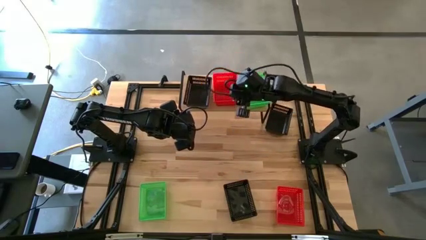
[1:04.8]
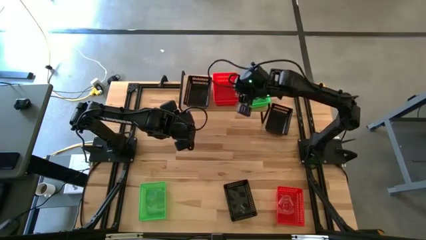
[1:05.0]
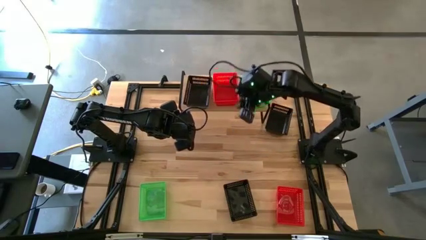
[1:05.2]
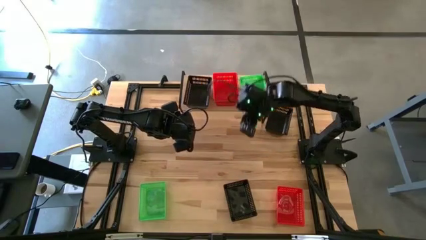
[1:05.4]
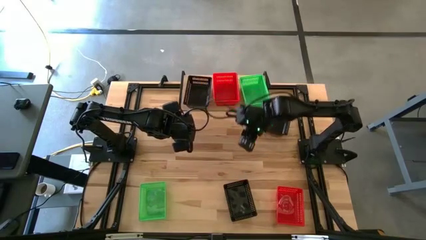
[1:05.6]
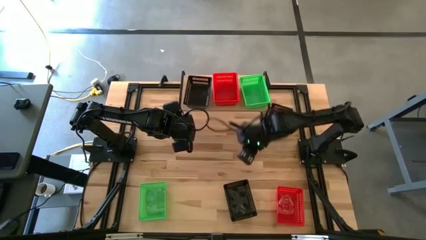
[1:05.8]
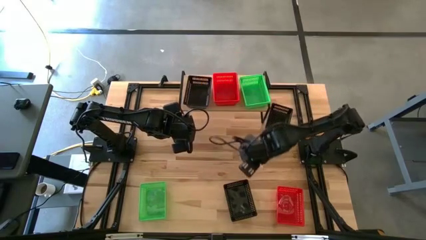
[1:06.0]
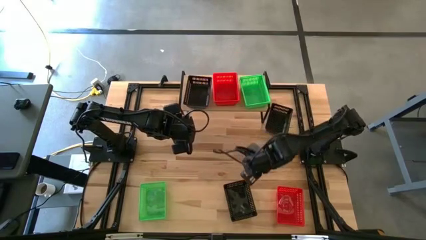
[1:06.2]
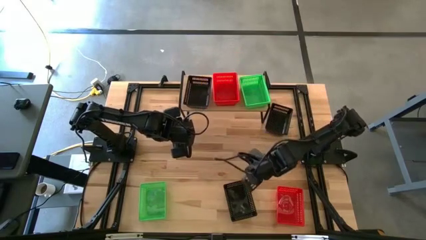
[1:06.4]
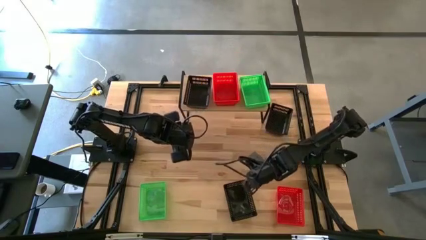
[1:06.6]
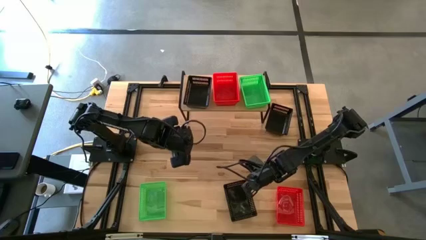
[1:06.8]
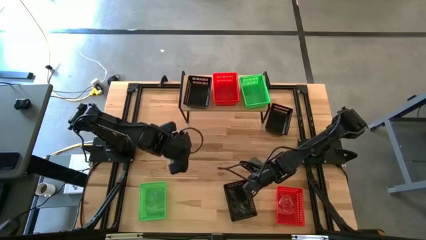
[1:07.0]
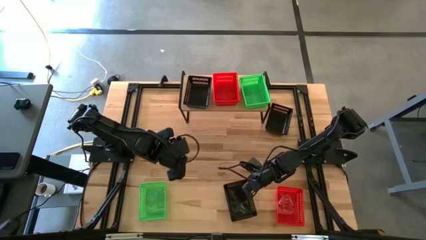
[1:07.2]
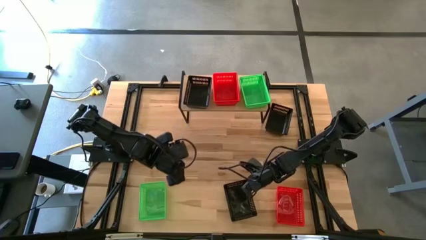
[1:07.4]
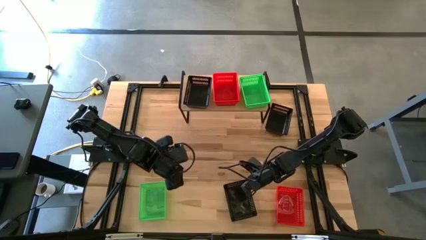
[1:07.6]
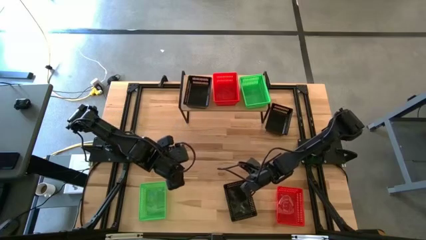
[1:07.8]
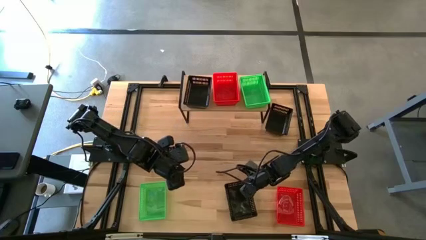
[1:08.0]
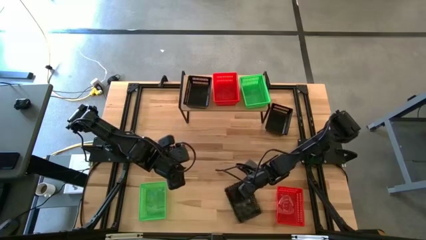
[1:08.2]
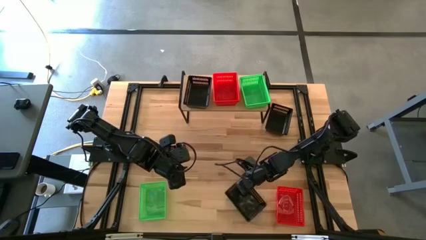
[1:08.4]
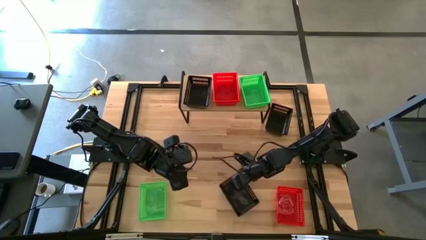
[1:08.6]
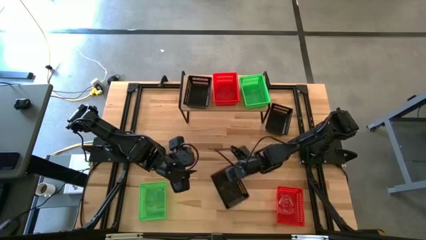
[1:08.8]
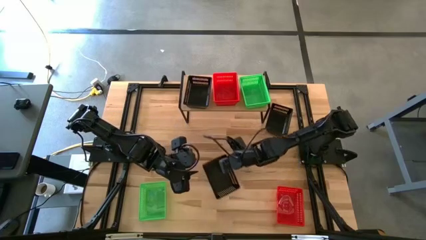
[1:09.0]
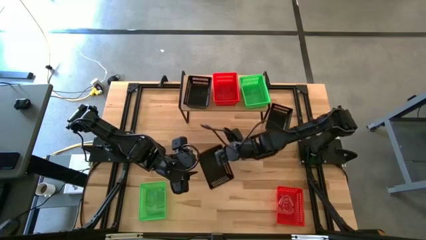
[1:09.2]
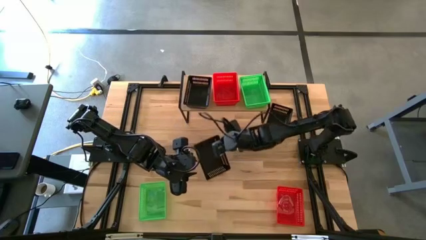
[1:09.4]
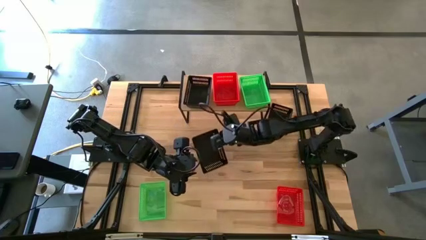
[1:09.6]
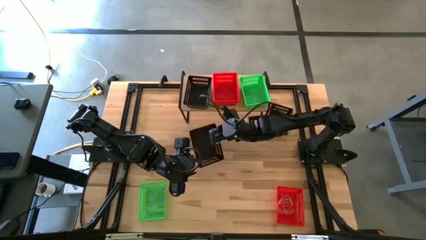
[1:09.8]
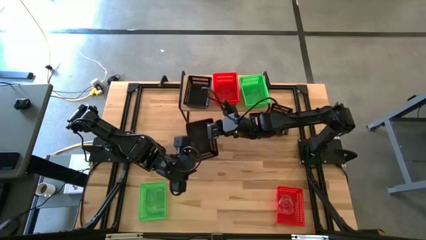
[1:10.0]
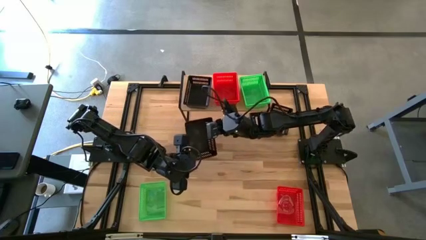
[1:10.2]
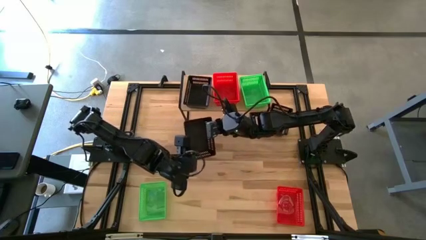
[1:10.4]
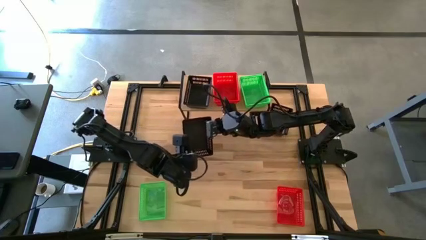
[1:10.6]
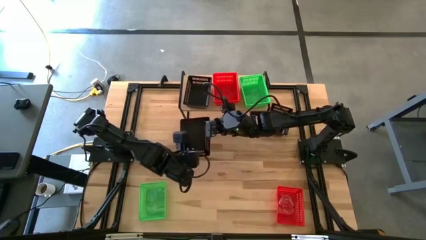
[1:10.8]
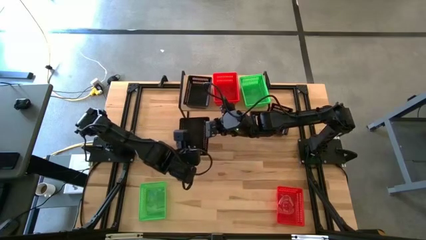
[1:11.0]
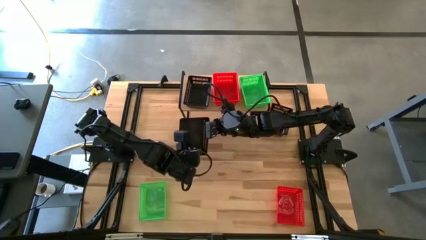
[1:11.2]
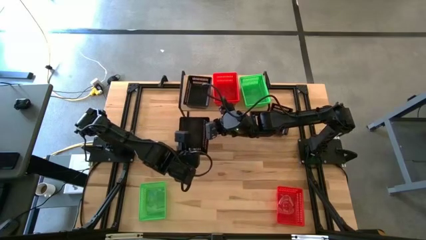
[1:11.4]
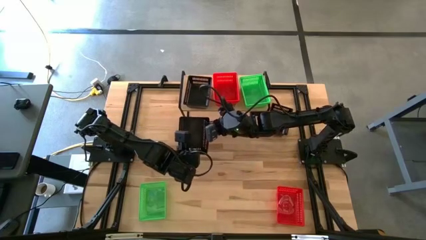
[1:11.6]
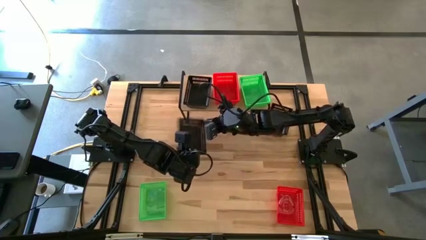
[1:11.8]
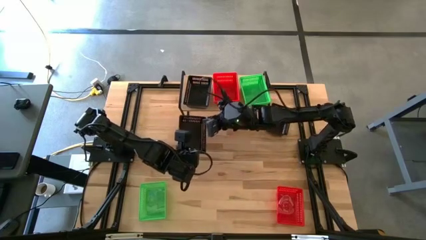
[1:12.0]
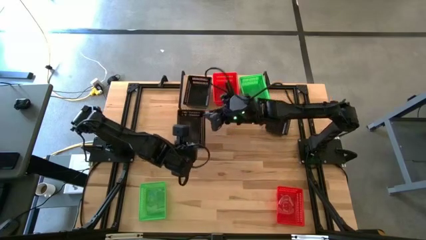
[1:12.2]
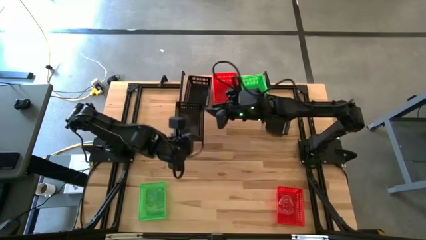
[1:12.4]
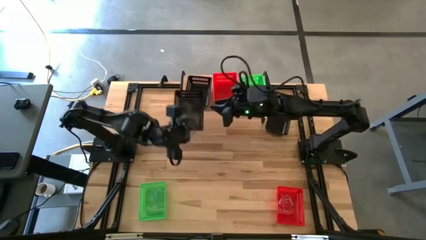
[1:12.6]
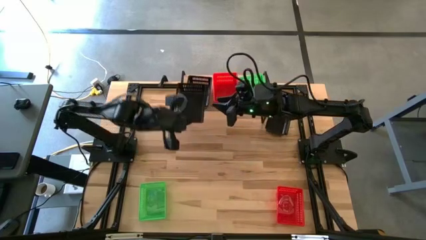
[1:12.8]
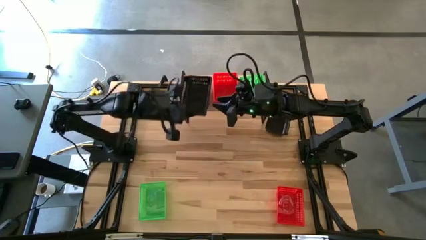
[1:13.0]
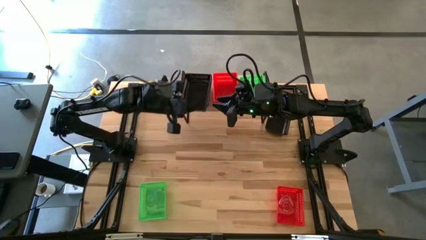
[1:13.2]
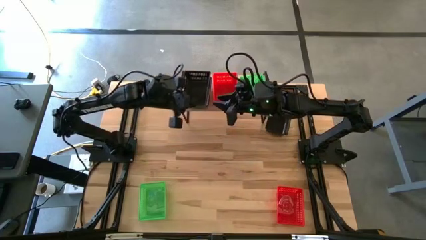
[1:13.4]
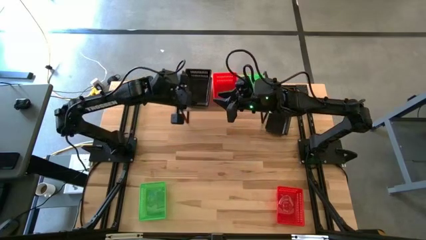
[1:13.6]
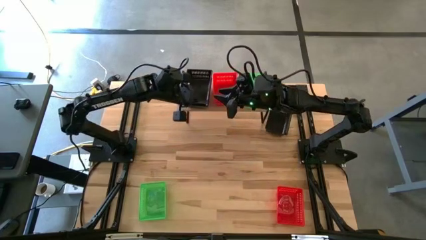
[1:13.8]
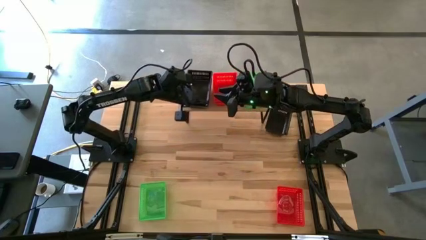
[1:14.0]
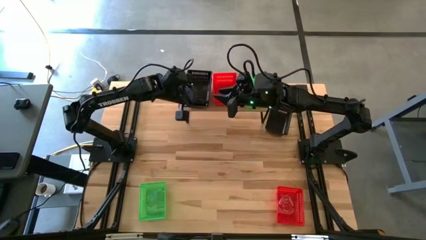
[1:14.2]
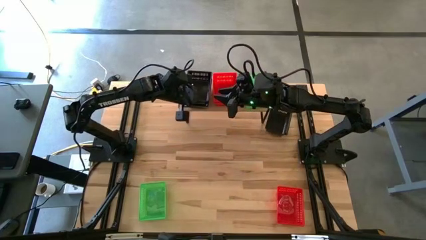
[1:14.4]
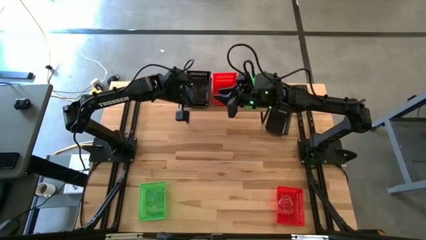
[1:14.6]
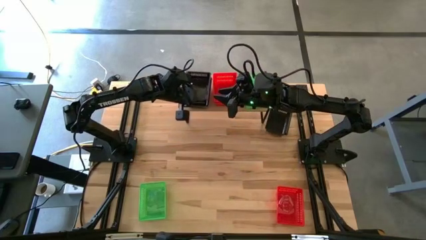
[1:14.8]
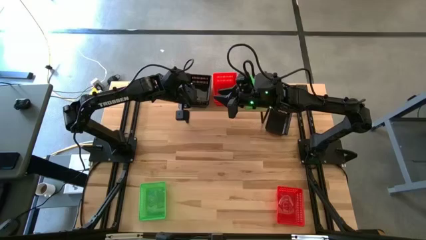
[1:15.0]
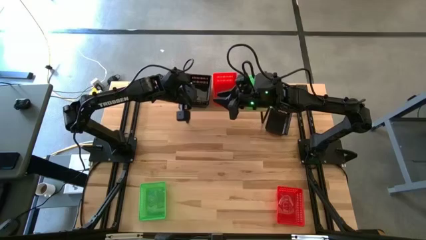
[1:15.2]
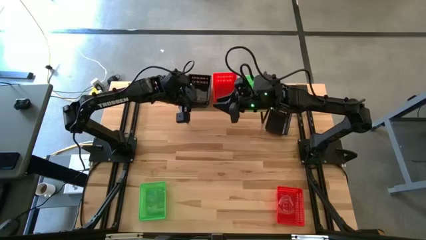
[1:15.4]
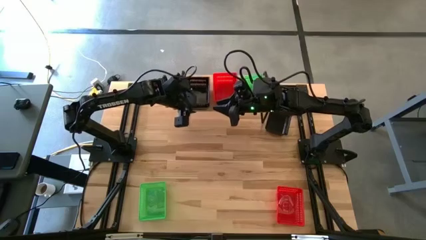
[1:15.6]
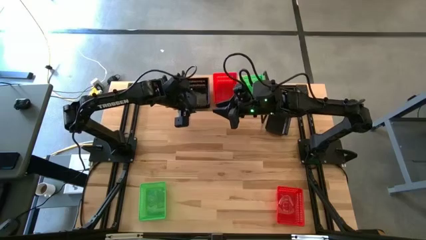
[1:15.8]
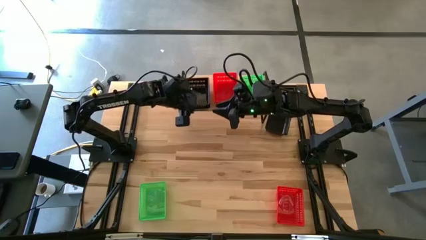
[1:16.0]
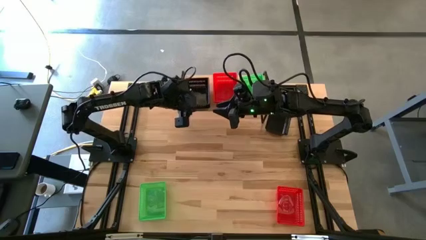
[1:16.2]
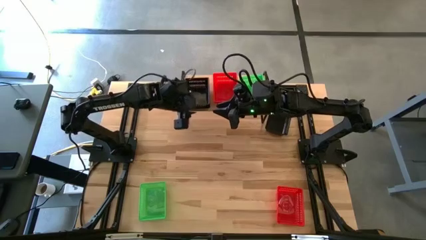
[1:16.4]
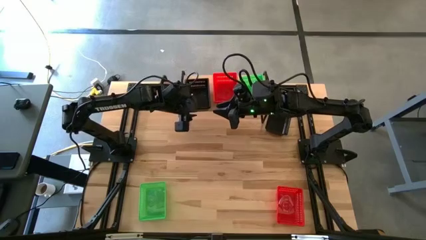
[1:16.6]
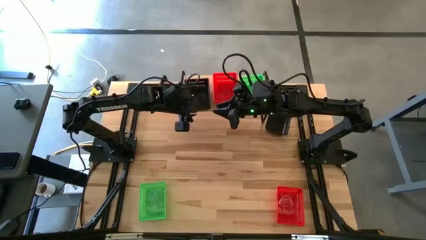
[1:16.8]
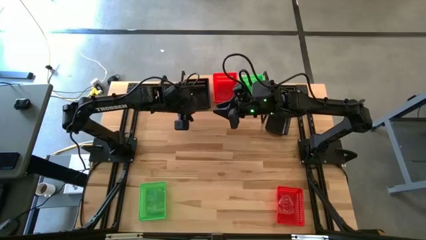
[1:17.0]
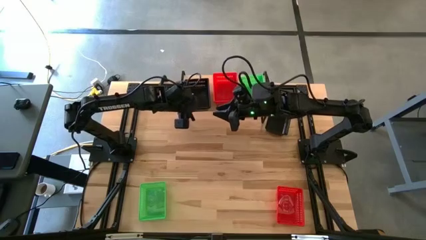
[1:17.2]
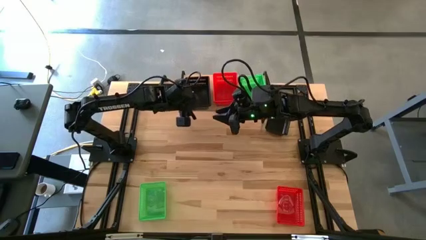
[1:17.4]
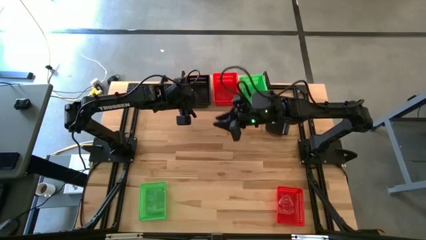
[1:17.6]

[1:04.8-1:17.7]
Task: Stack baskets on shelf by color
Stack the bottom black bin on the black bin on the shelf

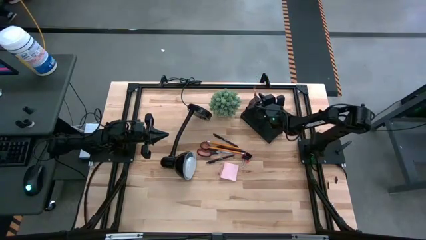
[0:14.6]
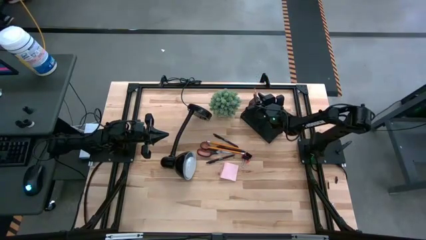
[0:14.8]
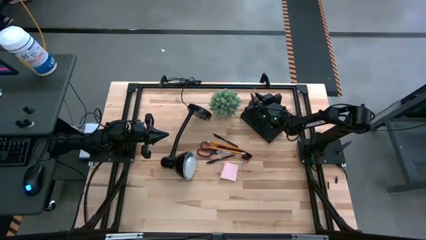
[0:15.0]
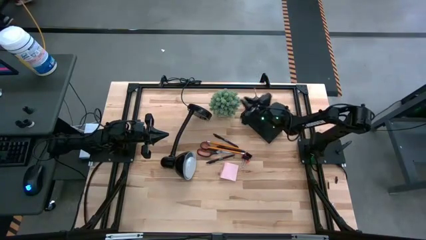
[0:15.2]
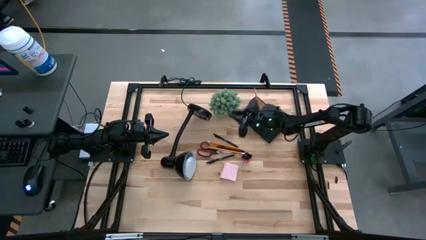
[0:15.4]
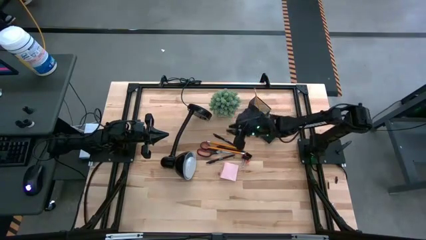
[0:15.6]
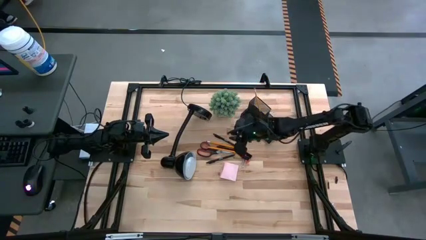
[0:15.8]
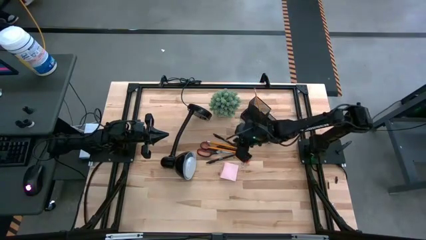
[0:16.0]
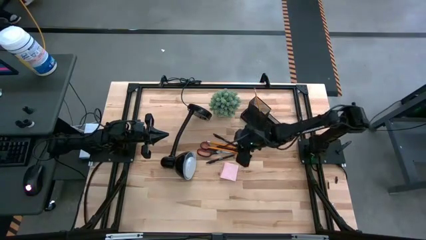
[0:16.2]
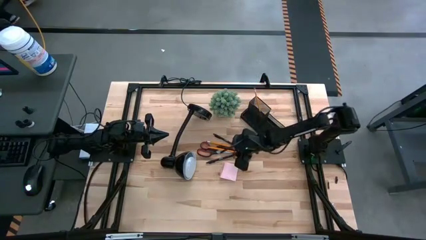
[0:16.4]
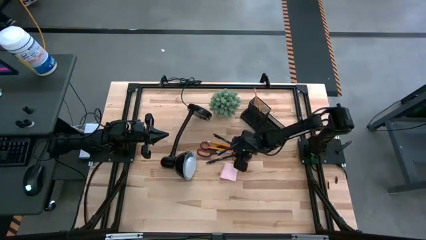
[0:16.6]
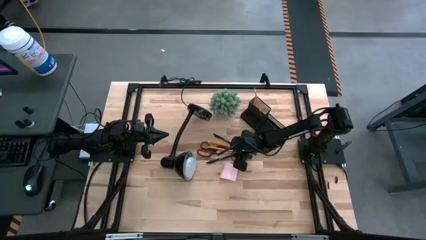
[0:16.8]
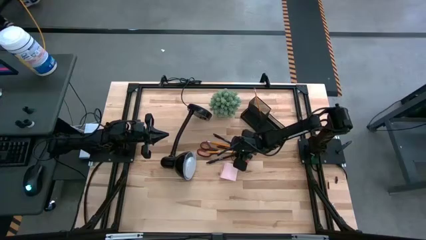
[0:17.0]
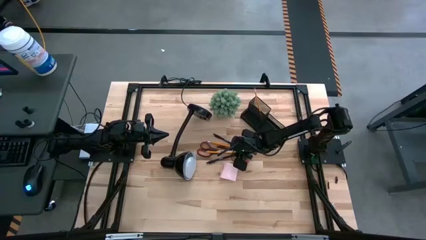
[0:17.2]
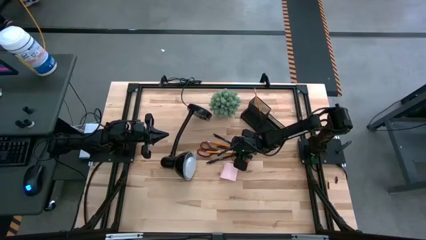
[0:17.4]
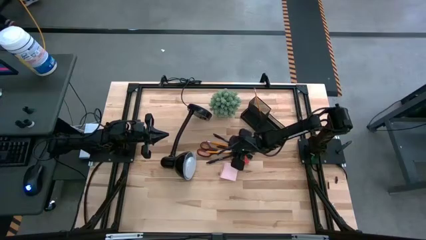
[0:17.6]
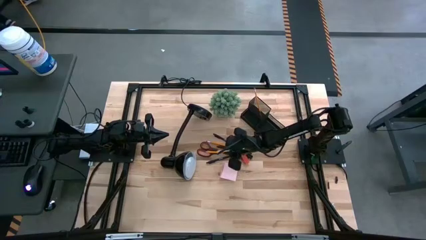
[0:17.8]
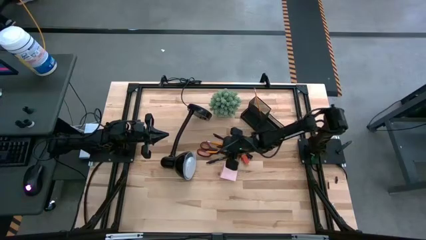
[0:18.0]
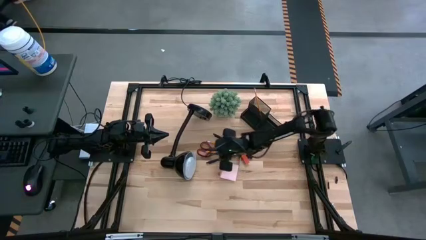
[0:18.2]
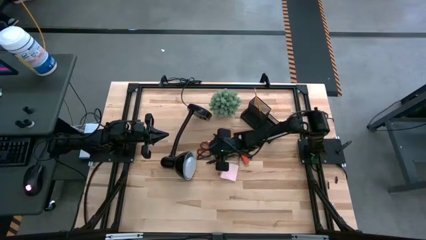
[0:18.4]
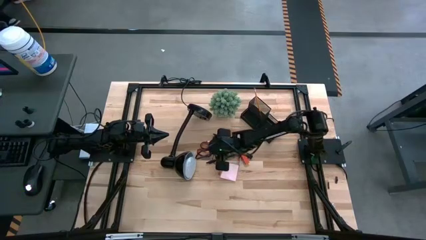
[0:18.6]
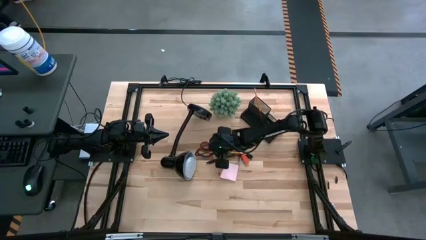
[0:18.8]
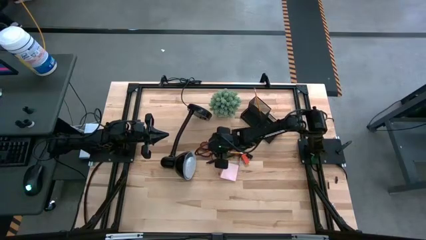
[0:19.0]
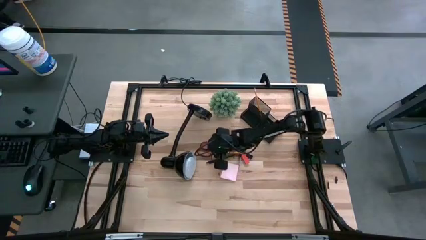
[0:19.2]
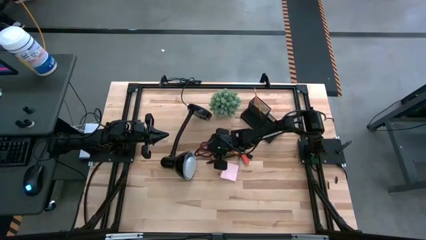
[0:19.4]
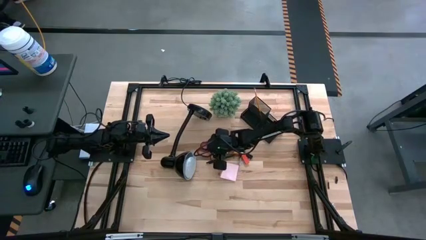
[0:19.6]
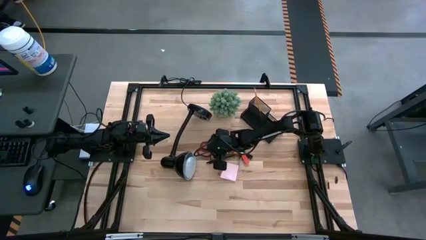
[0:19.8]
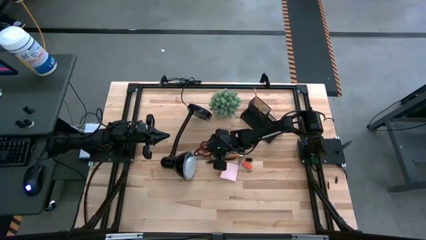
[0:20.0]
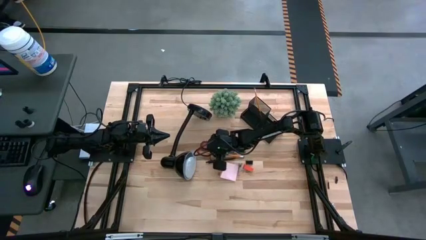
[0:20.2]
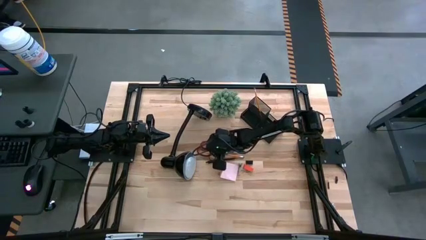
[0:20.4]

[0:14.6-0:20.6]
Task: Pick and place office supplies into organizer
Put the bottom pencil into the top left section of the desk organizer
